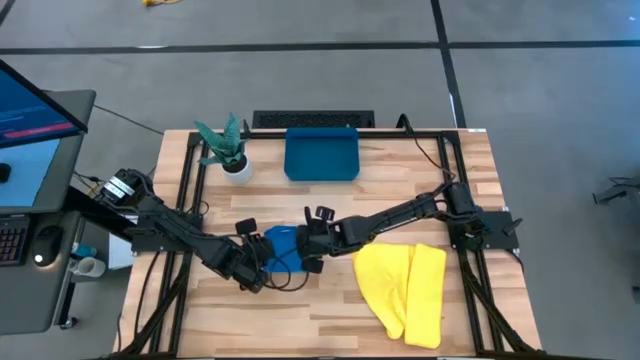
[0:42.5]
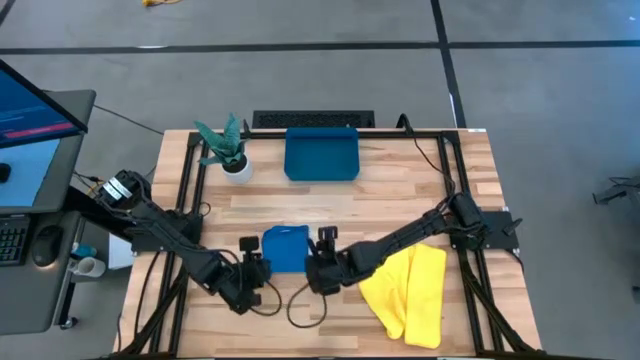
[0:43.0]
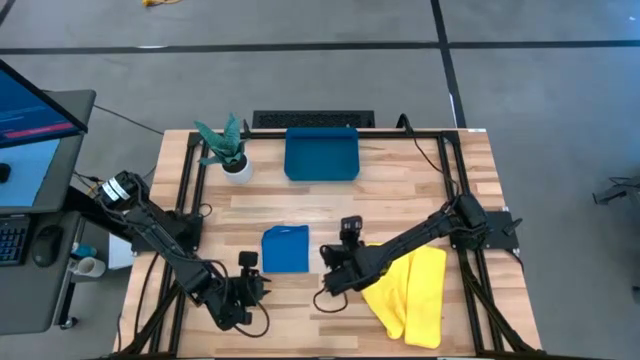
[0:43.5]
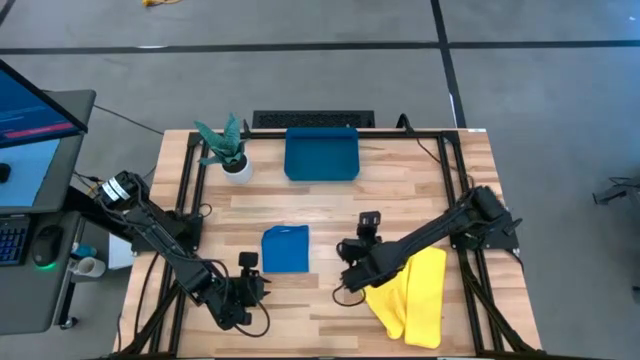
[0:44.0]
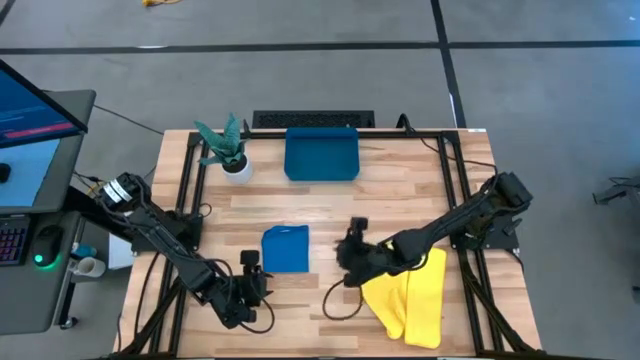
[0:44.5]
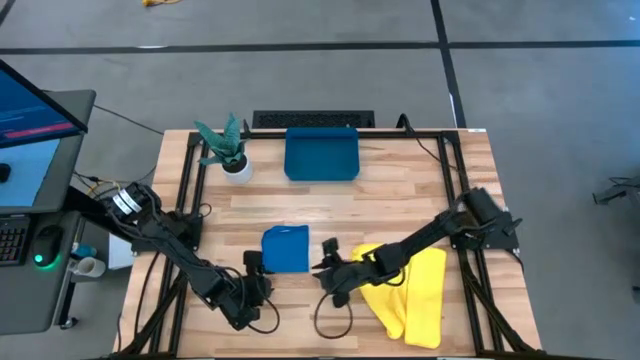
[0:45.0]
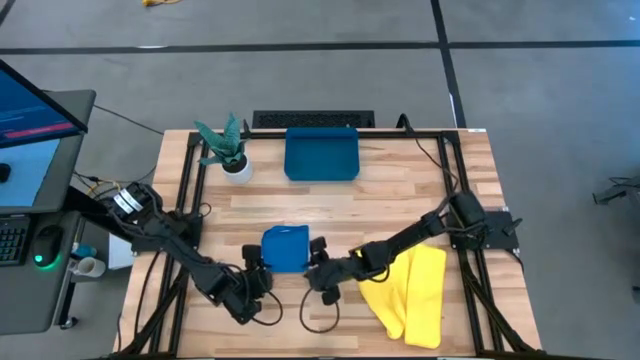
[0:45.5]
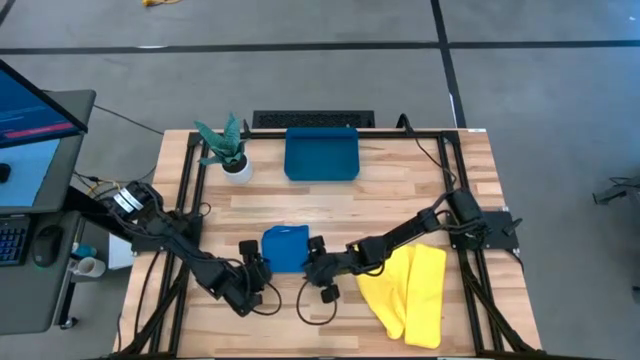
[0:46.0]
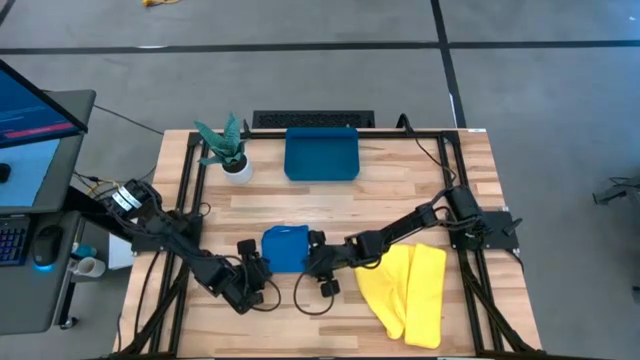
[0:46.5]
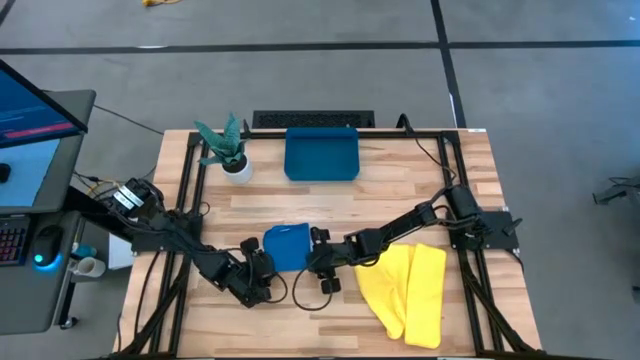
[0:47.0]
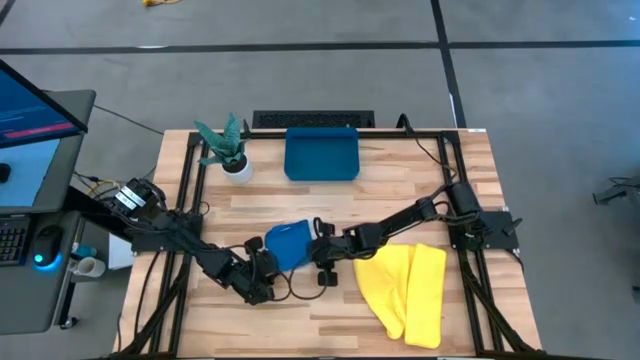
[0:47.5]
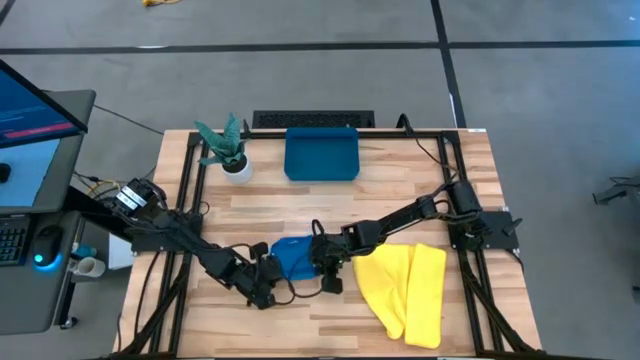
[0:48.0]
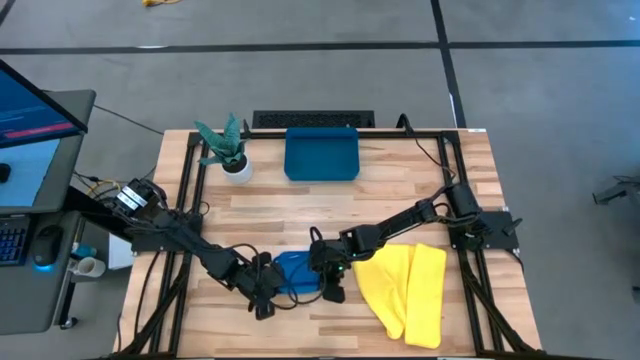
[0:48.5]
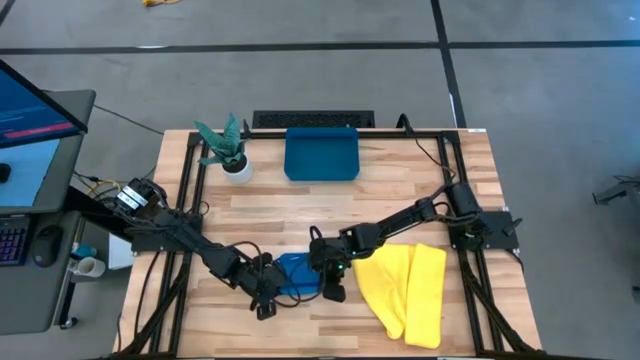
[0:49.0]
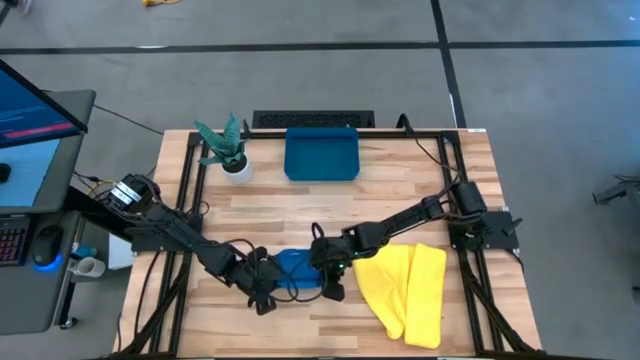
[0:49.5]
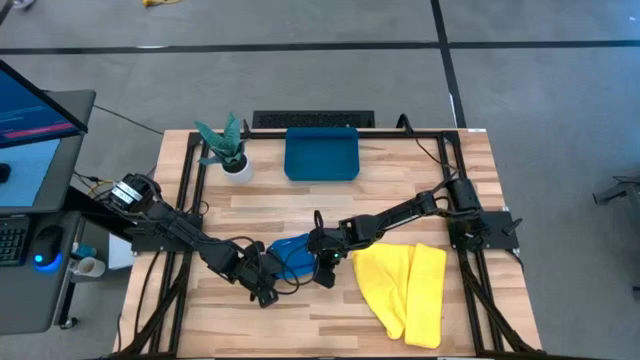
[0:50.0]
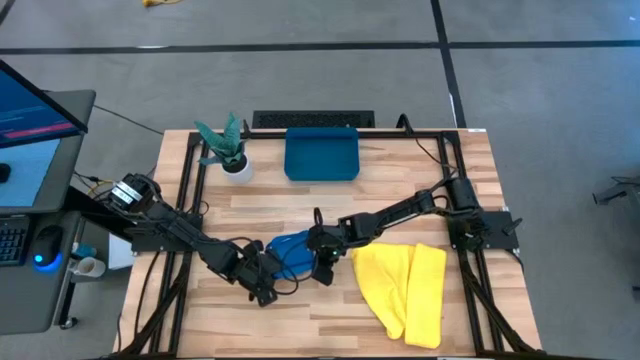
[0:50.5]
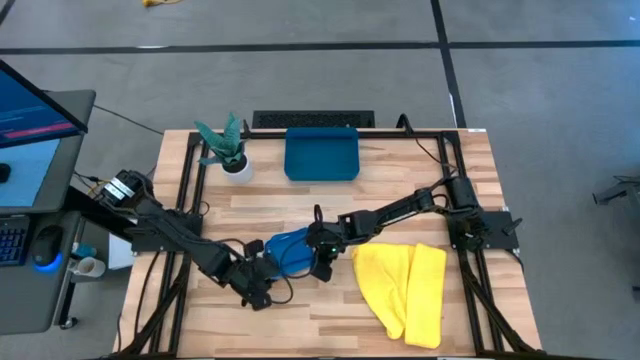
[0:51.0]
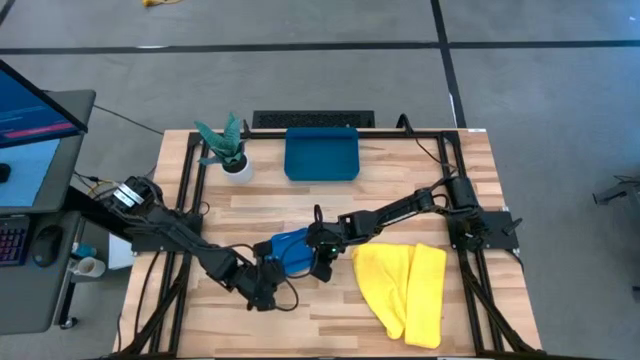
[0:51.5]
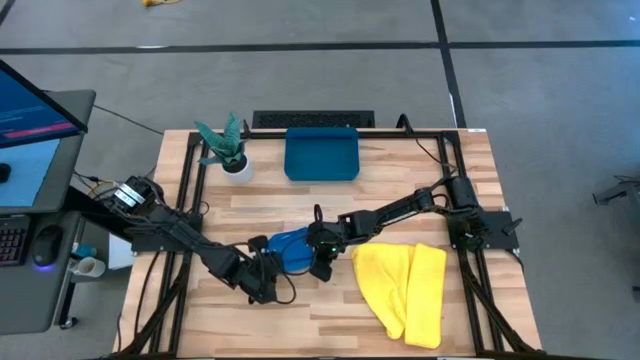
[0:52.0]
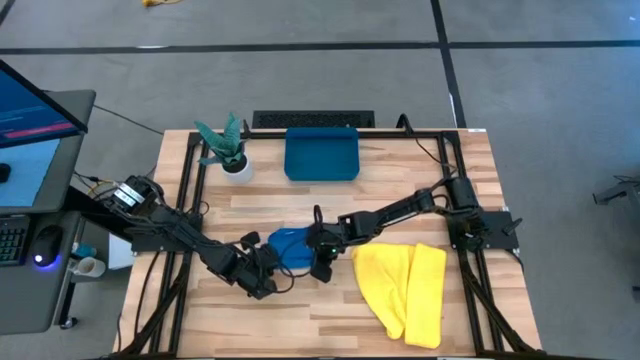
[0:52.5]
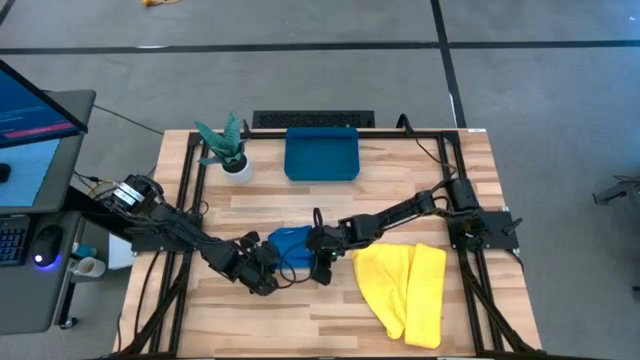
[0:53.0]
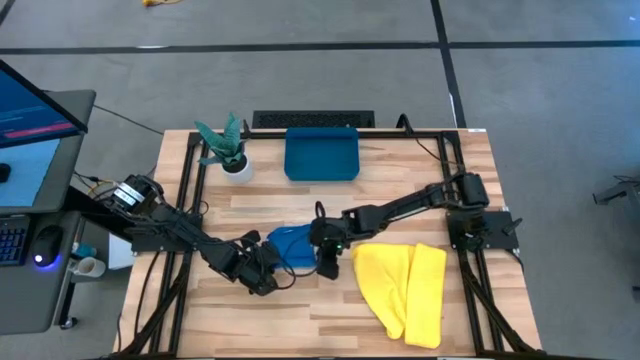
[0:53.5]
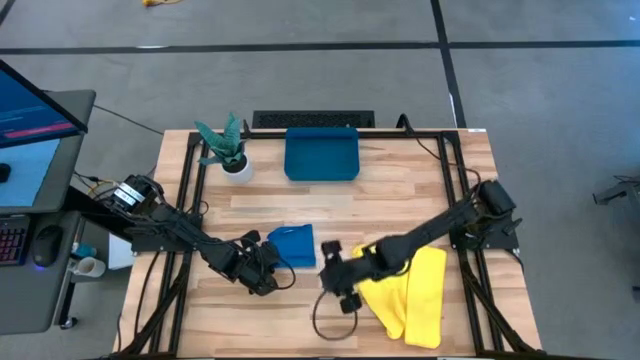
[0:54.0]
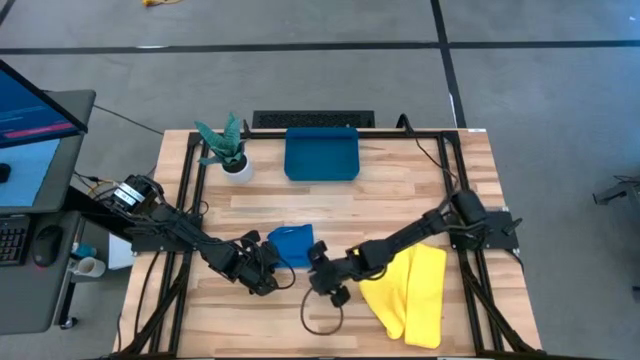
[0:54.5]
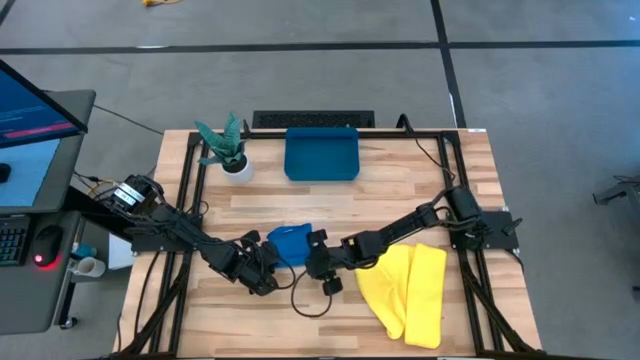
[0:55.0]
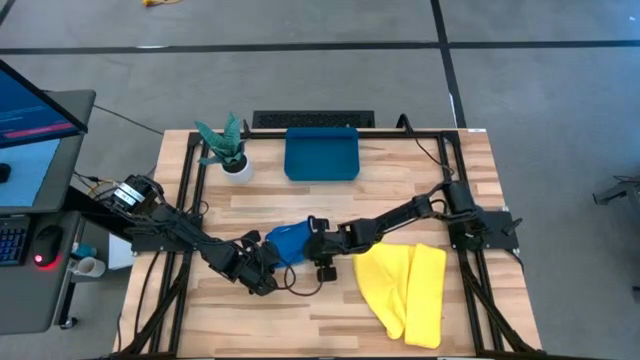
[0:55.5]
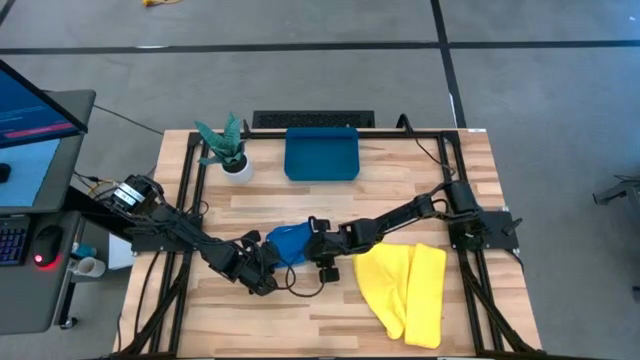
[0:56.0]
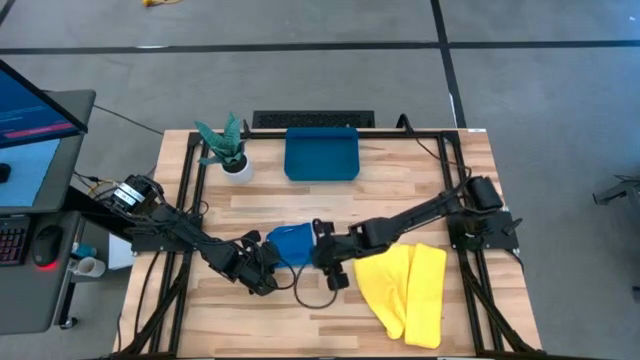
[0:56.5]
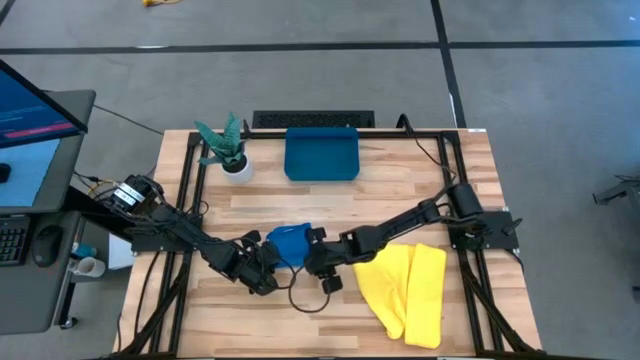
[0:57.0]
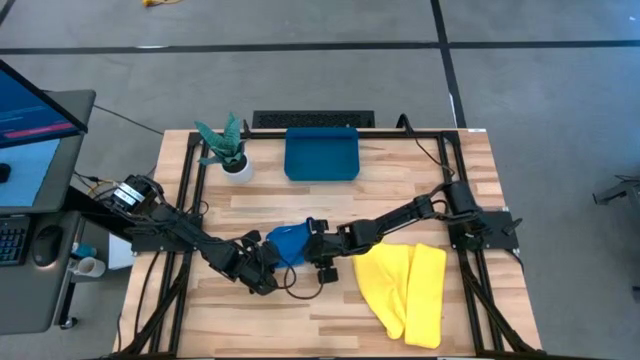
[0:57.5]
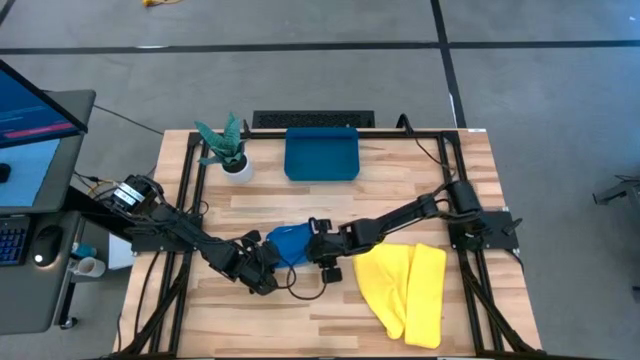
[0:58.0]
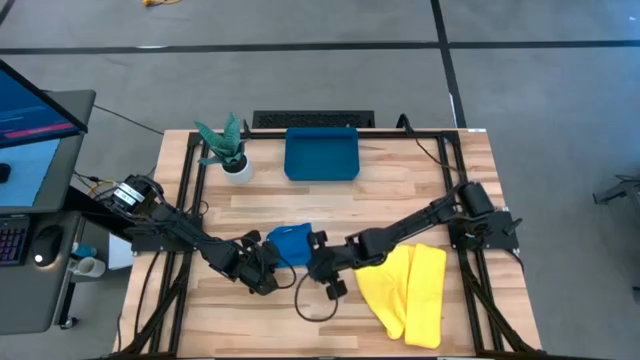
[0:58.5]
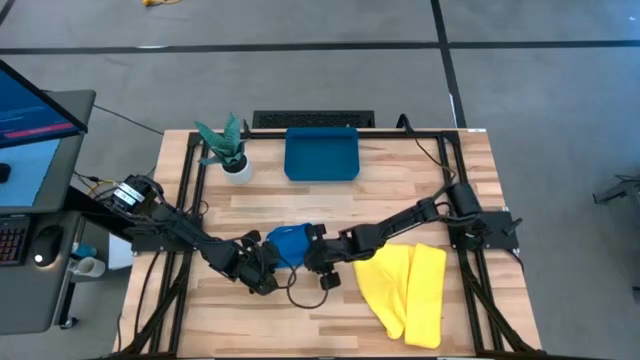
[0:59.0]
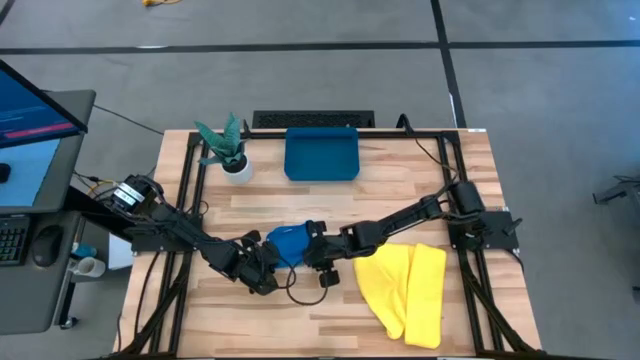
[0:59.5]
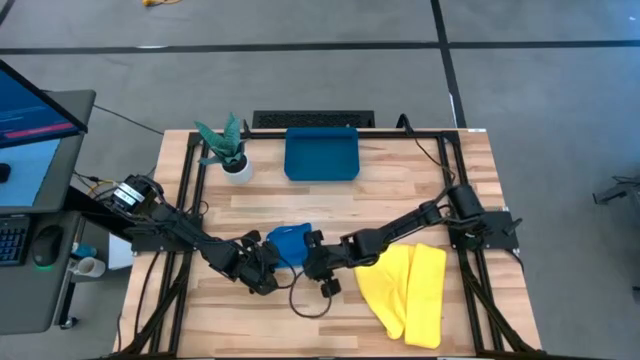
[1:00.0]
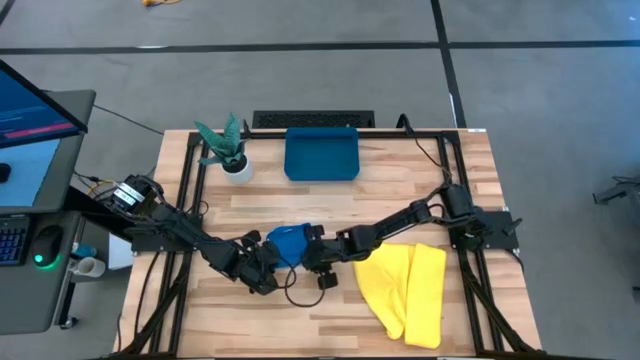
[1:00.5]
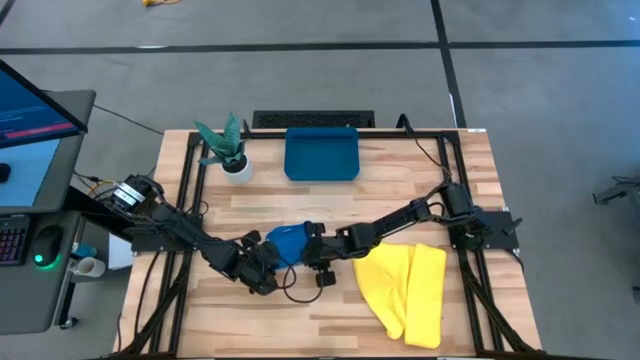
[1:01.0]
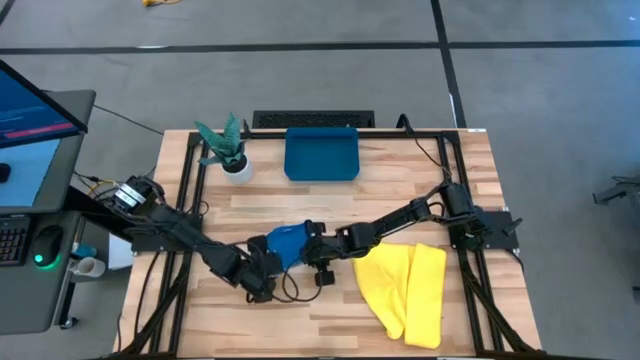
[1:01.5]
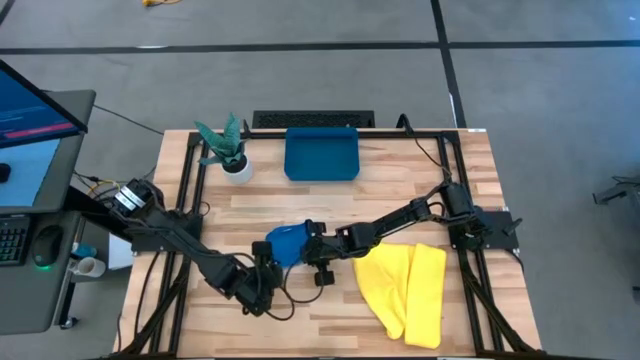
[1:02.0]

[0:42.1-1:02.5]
Task: Roll microfiber towels into tight, uniform cylinder then place into a basket
Roll the blue microfiber towel
